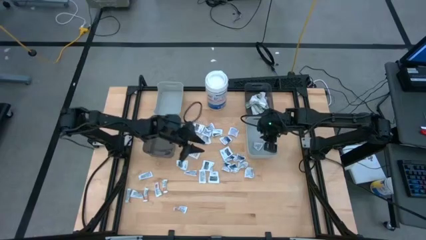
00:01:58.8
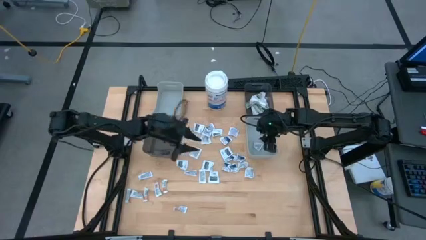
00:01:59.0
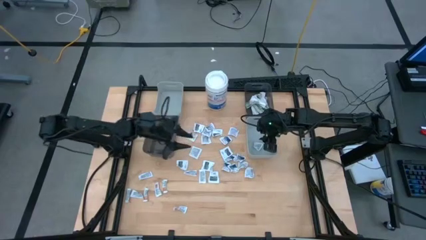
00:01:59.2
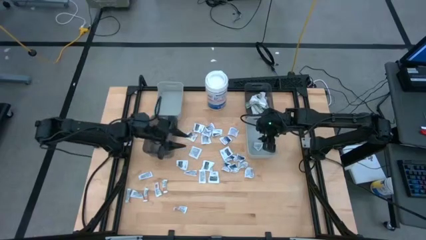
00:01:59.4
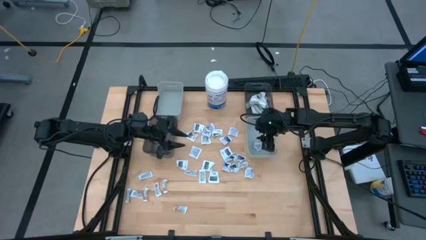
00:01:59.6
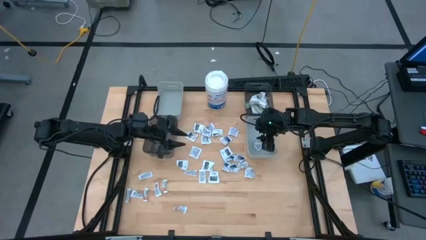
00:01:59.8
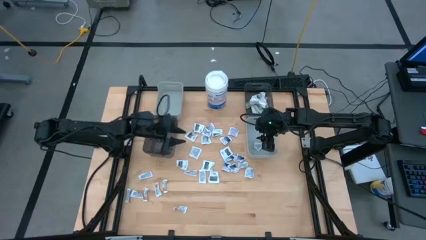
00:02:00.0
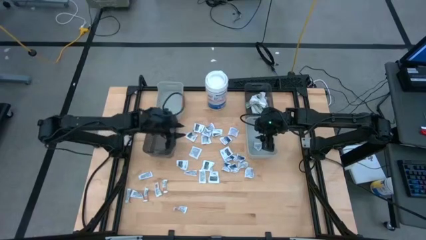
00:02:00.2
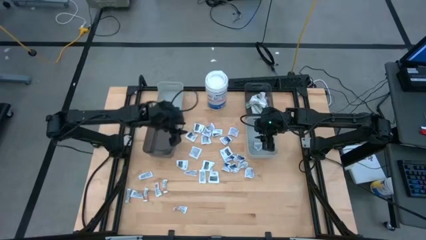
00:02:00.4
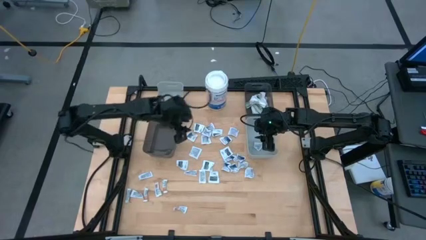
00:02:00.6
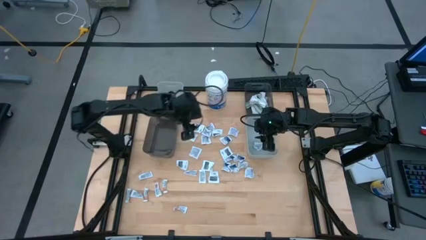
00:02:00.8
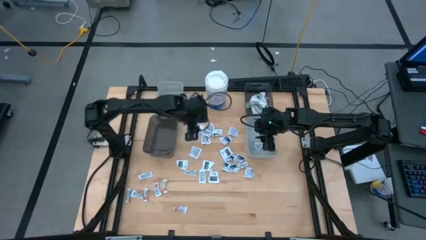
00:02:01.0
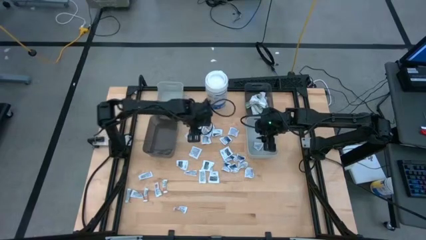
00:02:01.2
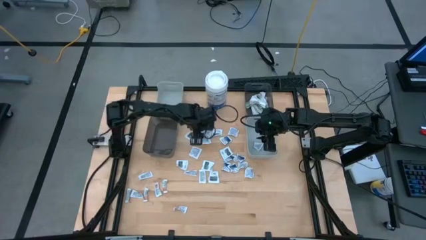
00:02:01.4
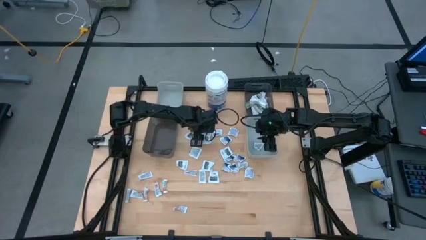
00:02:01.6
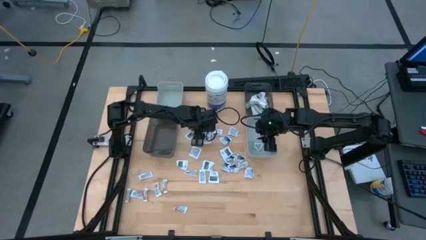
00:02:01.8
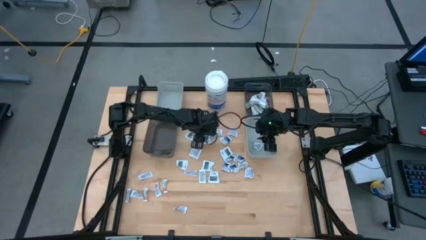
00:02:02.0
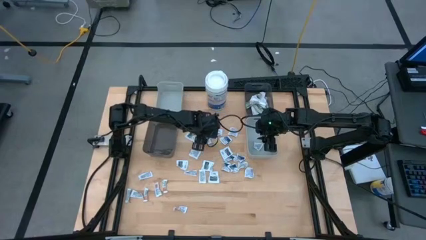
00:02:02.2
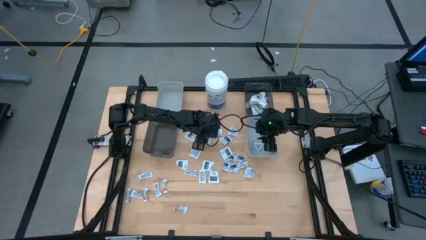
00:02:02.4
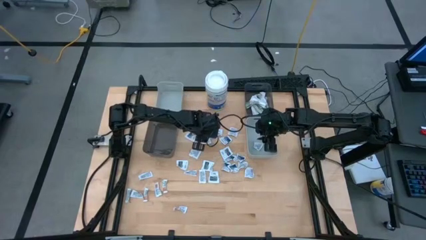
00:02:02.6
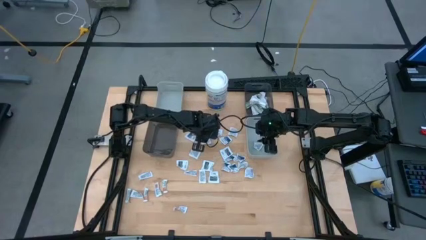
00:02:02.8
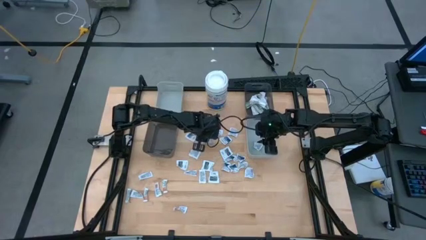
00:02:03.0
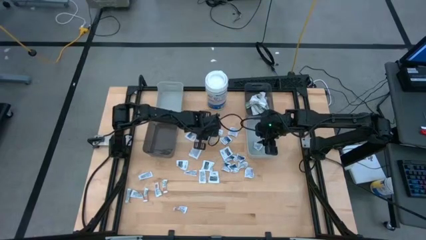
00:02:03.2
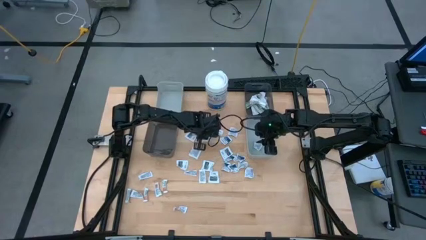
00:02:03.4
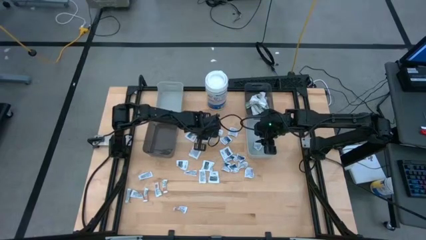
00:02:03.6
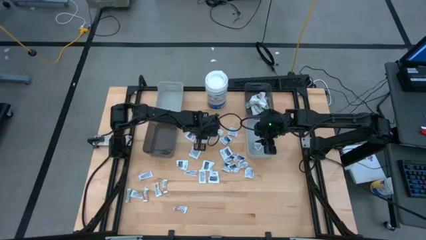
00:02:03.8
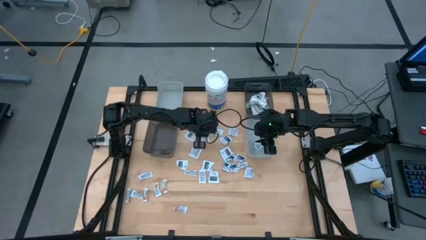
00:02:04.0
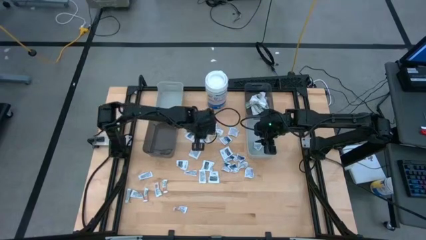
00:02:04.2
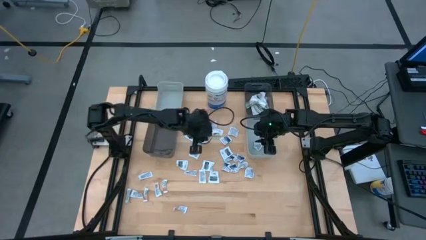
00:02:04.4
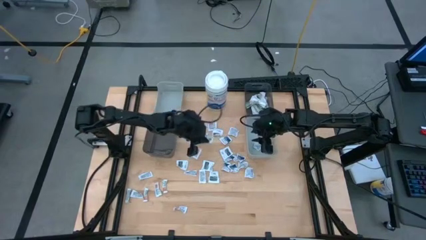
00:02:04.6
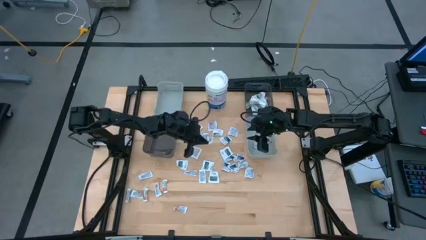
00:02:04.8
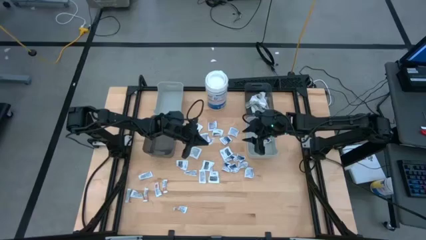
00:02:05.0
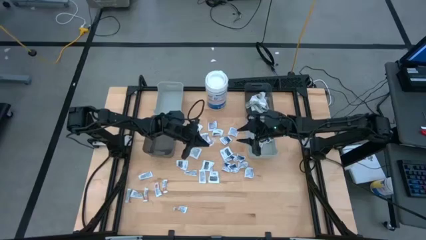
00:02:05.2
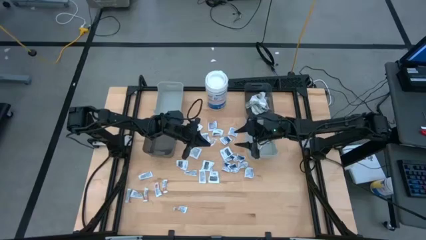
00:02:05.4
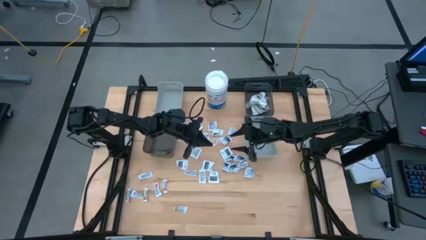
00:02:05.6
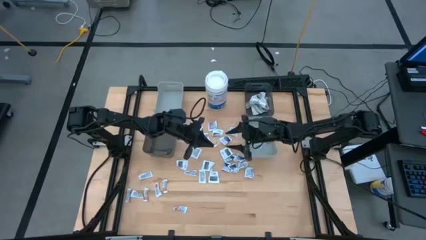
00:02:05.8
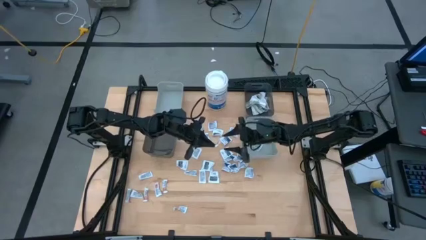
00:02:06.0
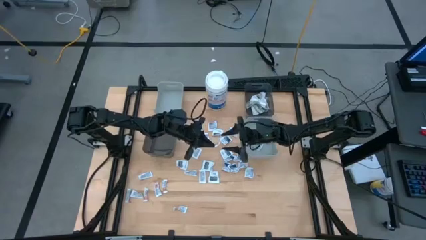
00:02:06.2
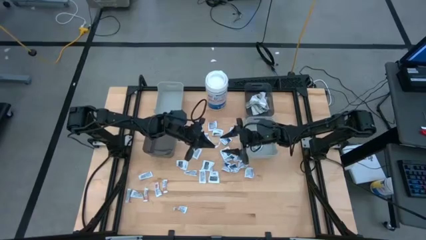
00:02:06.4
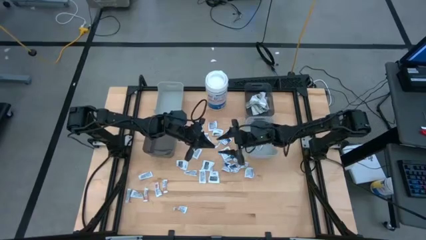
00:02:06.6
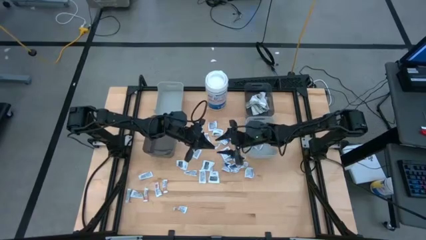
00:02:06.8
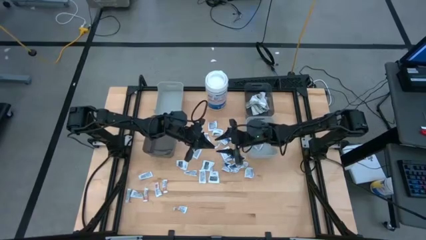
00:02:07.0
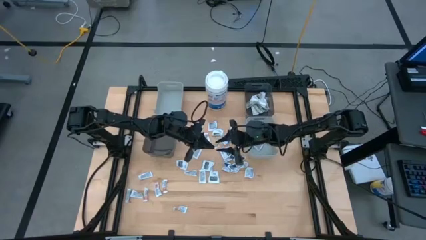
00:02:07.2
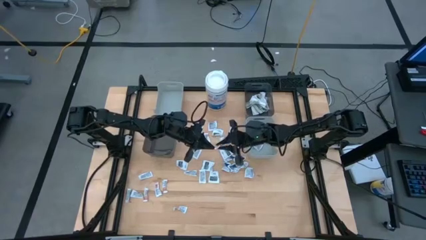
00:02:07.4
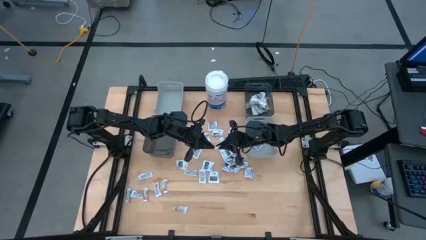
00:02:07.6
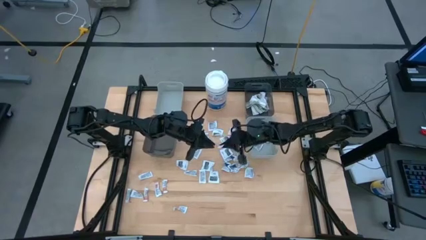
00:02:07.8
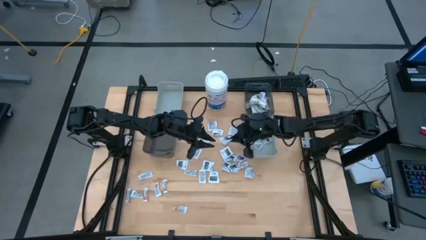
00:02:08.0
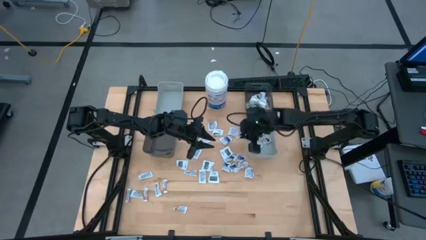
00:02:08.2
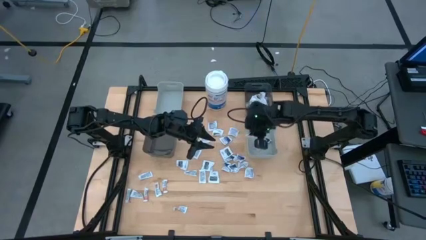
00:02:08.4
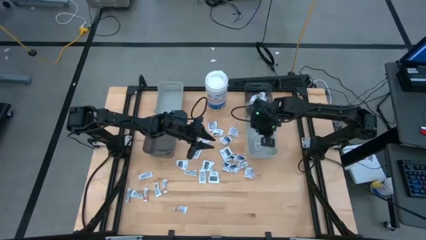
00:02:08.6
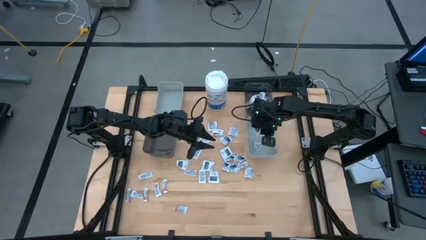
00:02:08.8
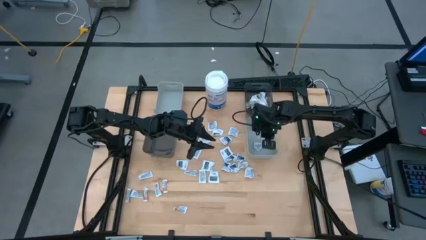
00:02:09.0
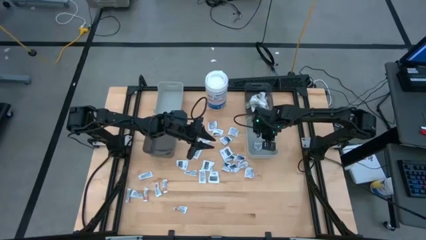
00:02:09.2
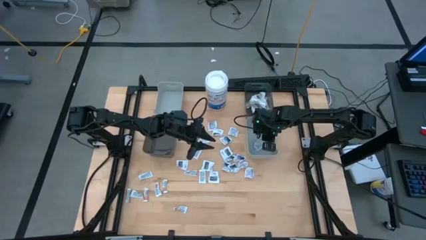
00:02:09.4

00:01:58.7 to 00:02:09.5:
Task: Pick & Place First Aid Supplies
Put the blue alcohol pad into the right gray bin

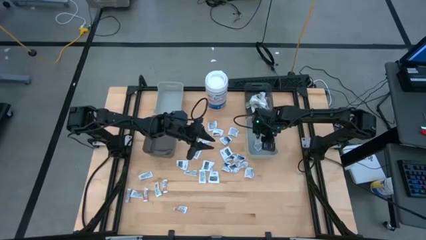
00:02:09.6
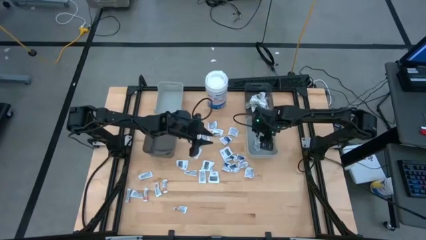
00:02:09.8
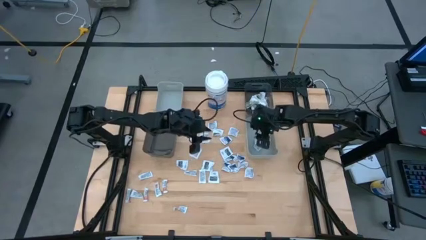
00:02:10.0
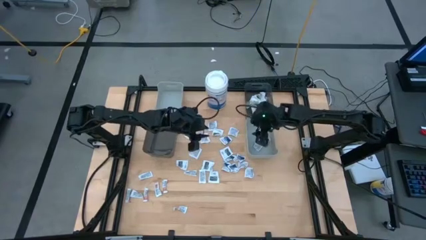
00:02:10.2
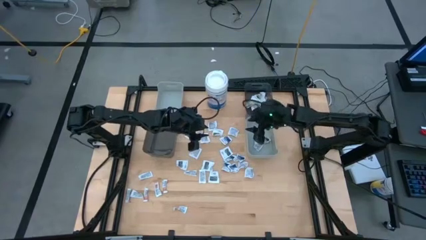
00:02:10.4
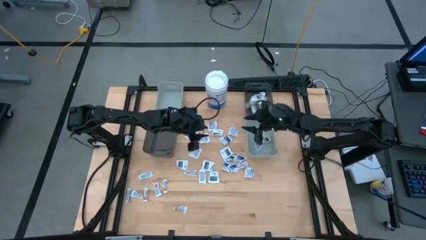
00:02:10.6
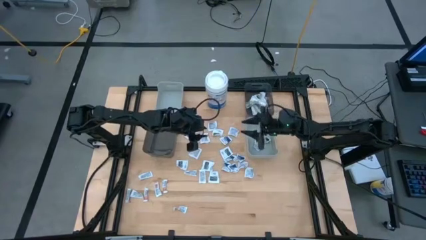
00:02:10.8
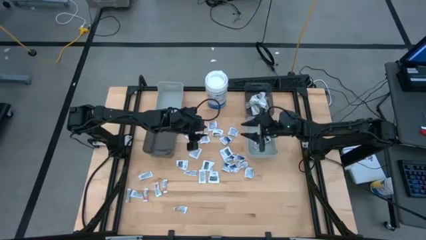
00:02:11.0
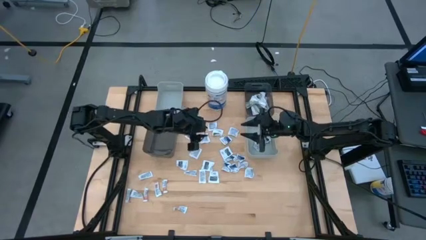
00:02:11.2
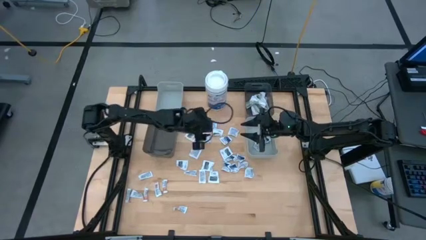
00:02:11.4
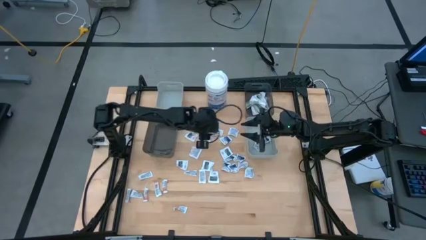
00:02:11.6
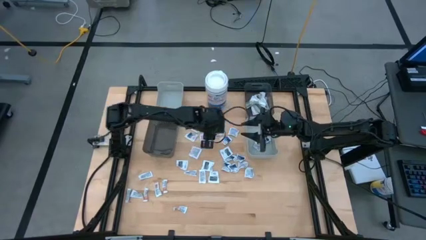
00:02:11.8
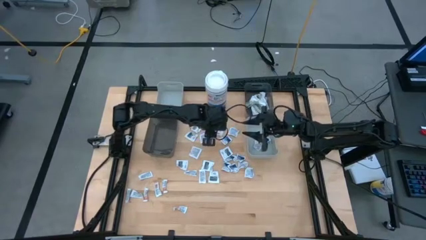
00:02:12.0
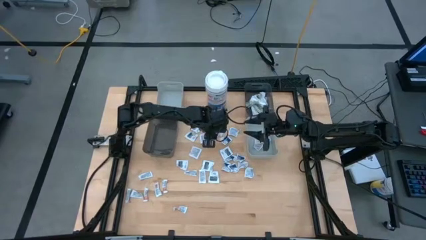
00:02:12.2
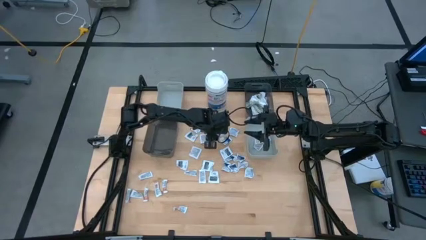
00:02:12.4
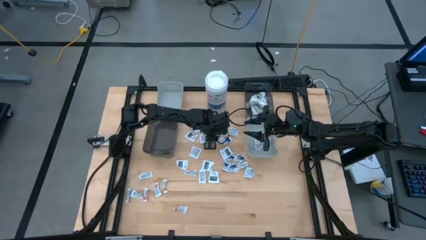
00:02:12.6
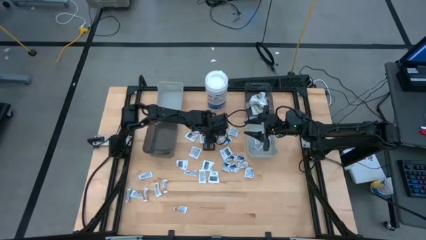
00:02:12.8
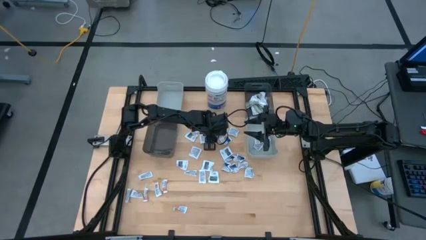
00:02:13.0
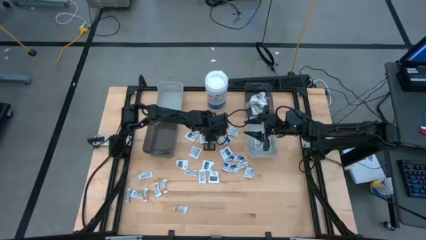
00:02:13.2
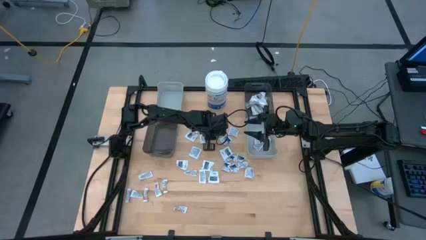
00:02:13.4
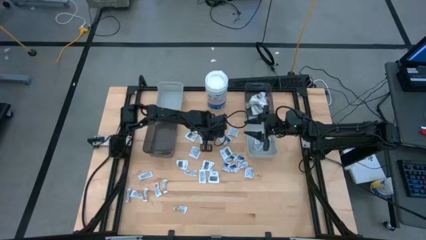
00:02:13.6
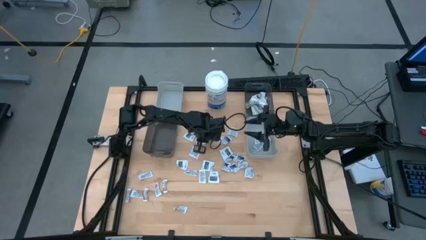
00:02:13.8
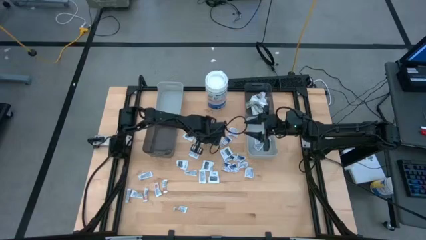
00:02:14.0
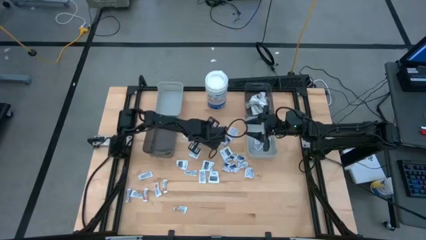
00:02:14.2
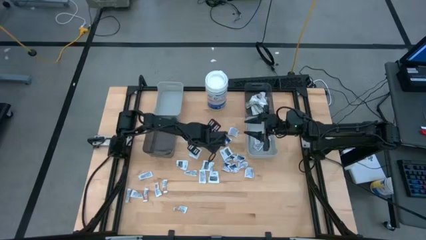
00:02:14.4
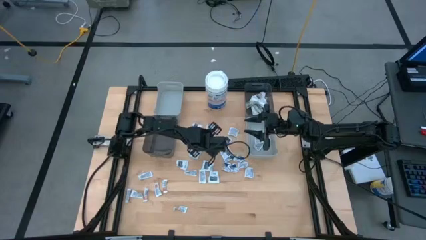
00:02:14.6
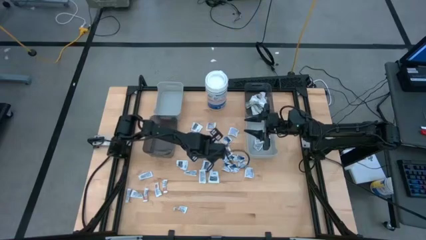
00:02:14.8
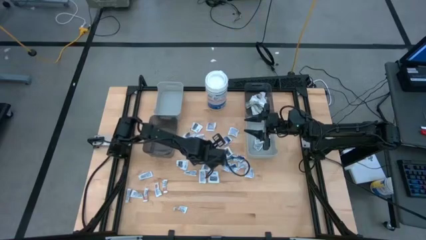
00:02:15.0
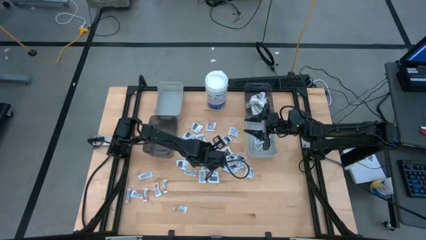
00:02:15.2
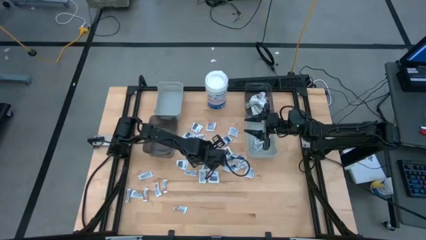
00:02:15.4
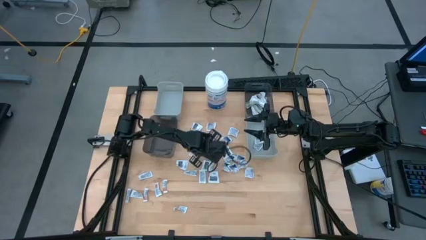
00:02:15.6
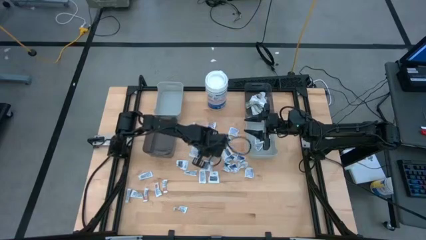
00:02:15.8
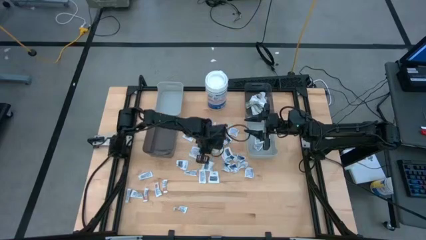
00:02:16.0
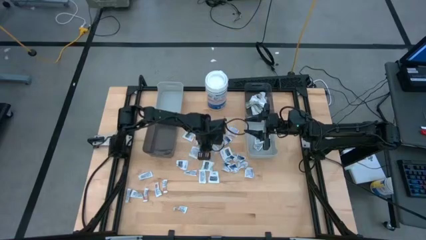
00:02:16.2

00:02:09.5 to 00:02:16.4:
Put the blue alcohol pad into the right gray bin
